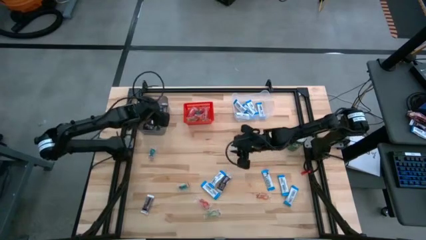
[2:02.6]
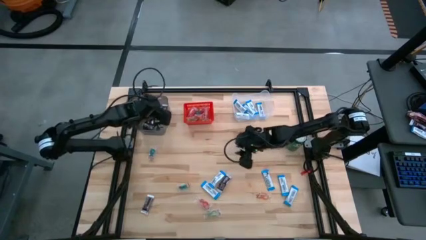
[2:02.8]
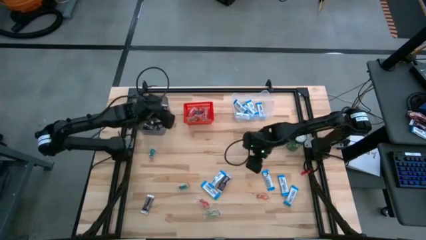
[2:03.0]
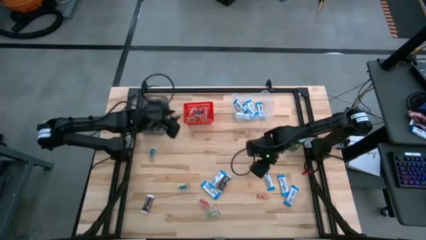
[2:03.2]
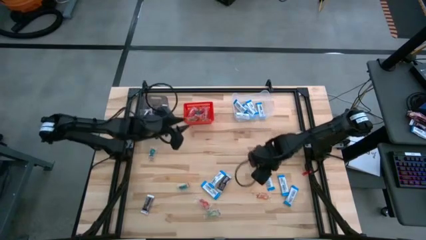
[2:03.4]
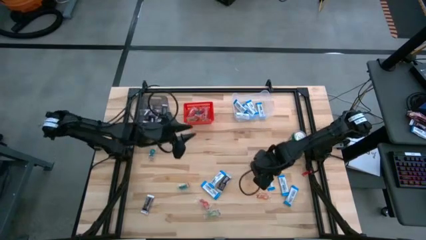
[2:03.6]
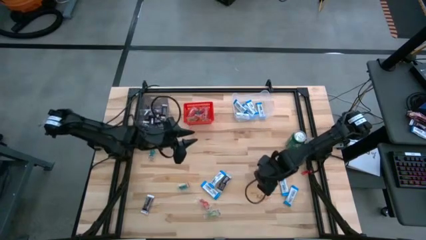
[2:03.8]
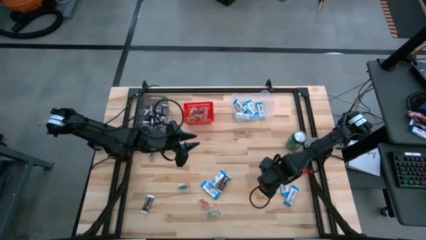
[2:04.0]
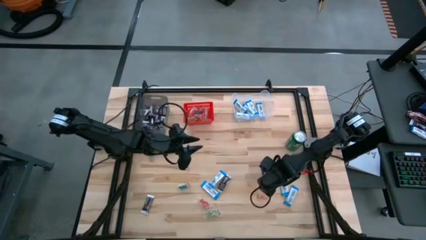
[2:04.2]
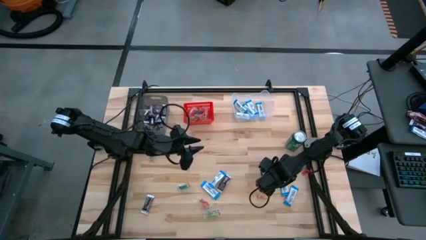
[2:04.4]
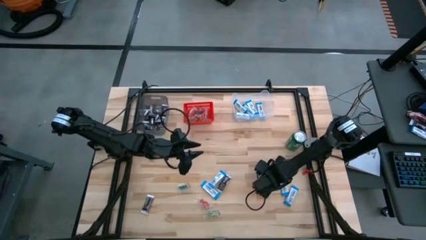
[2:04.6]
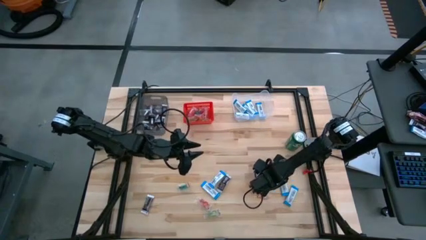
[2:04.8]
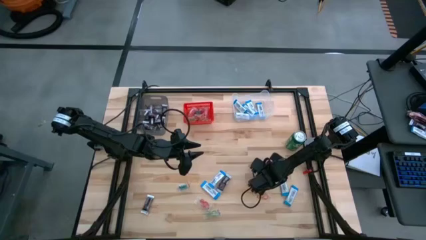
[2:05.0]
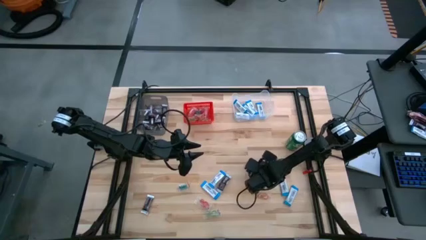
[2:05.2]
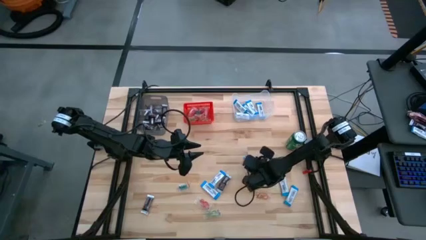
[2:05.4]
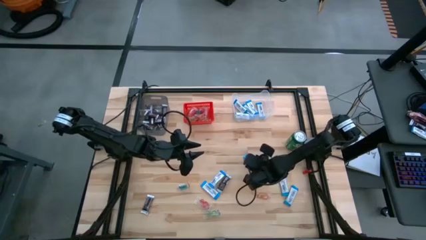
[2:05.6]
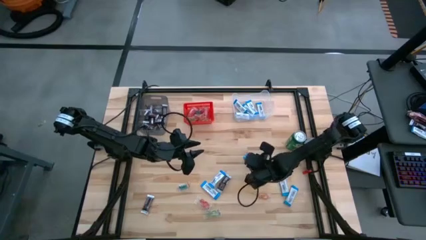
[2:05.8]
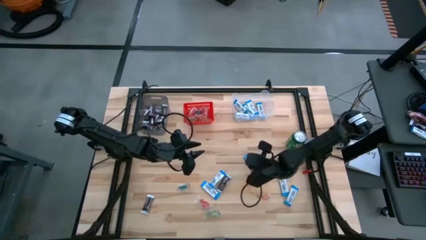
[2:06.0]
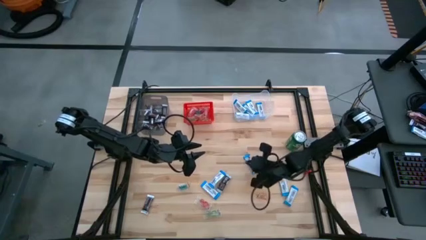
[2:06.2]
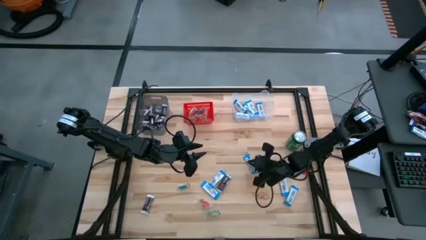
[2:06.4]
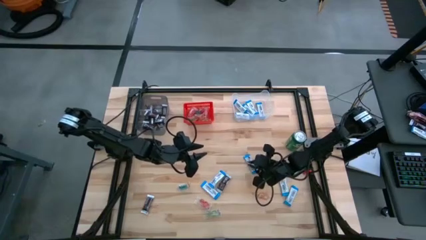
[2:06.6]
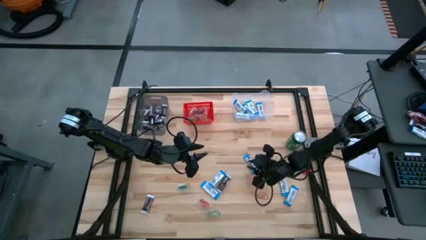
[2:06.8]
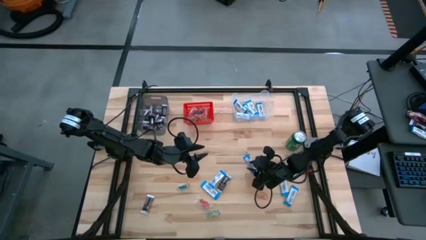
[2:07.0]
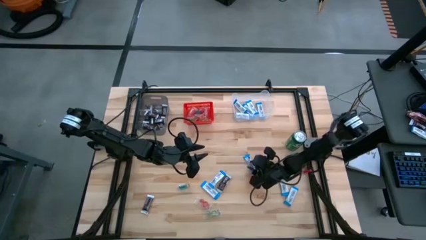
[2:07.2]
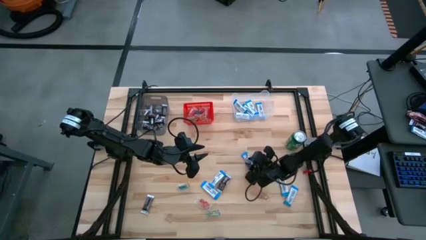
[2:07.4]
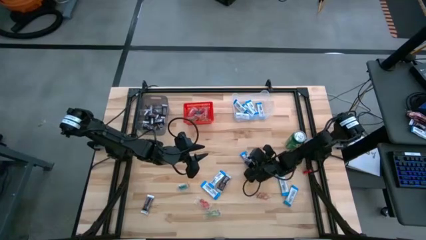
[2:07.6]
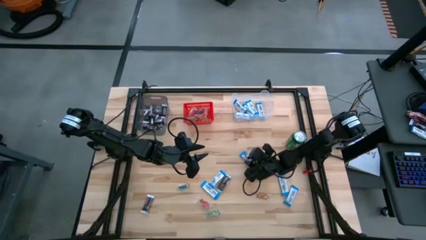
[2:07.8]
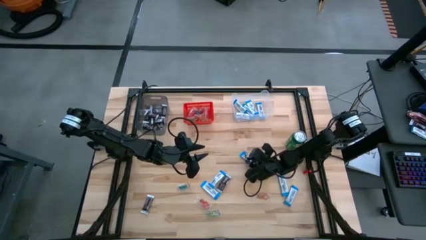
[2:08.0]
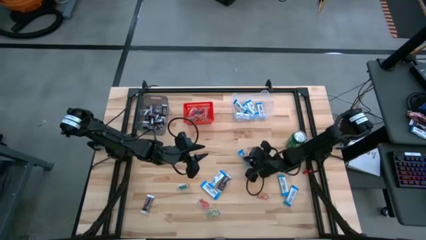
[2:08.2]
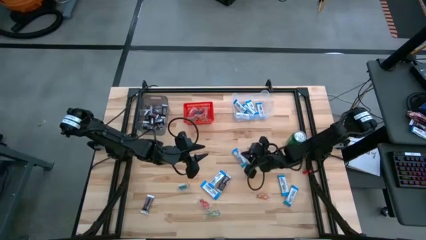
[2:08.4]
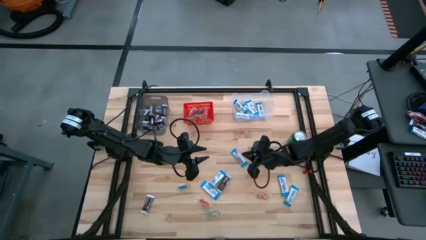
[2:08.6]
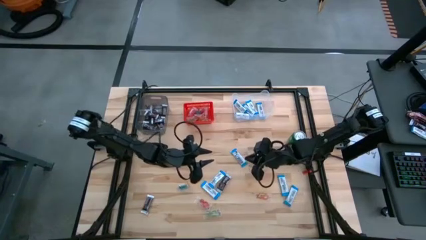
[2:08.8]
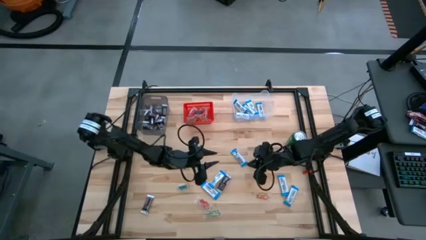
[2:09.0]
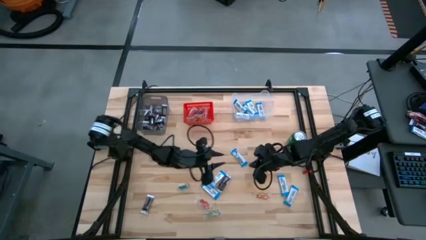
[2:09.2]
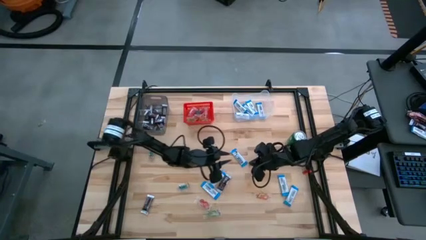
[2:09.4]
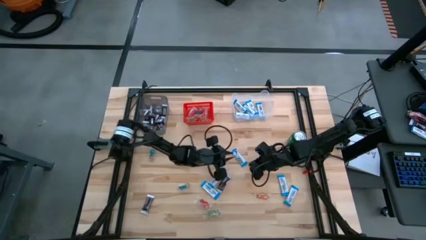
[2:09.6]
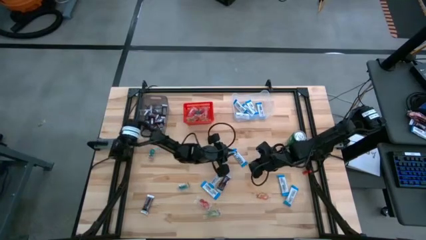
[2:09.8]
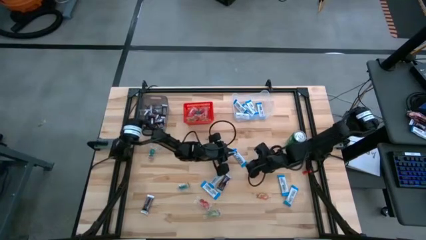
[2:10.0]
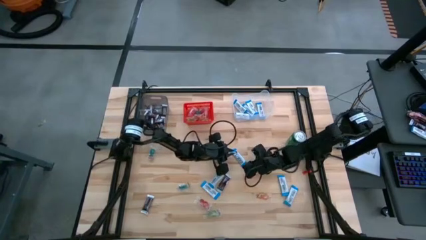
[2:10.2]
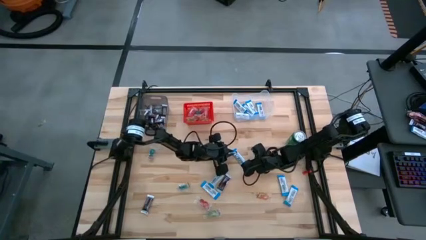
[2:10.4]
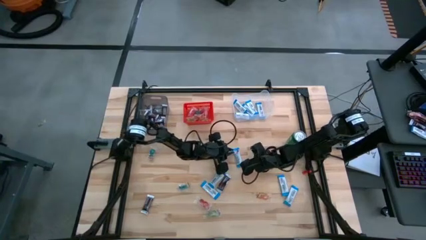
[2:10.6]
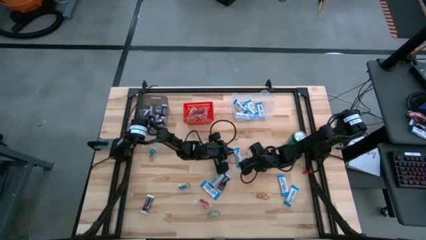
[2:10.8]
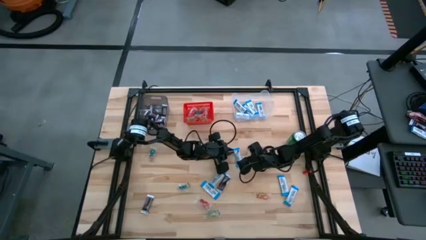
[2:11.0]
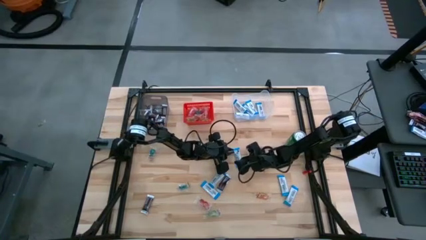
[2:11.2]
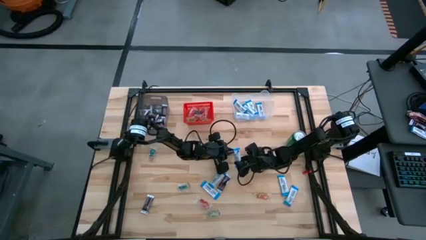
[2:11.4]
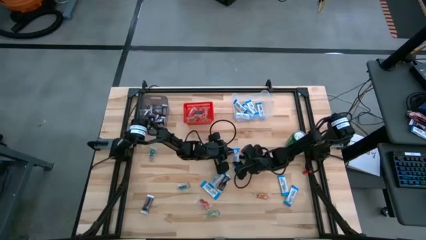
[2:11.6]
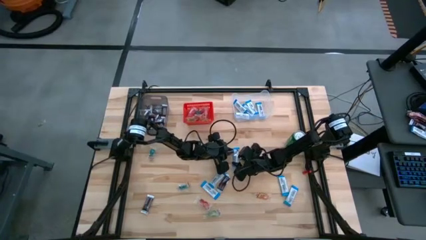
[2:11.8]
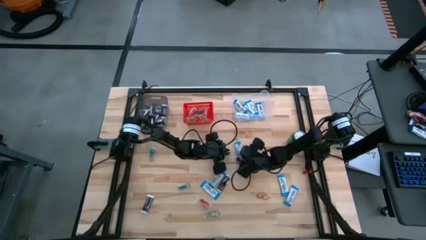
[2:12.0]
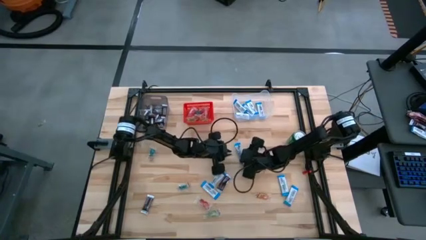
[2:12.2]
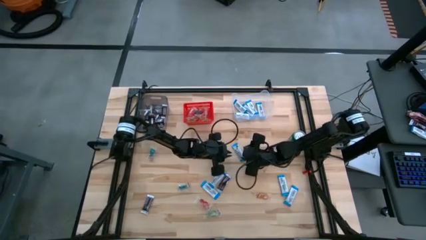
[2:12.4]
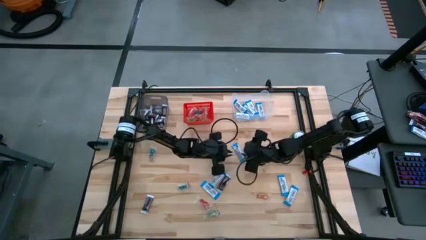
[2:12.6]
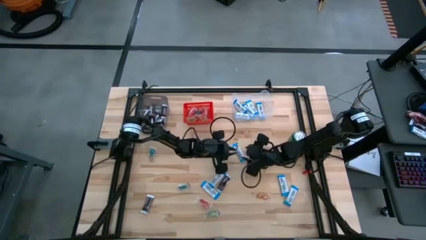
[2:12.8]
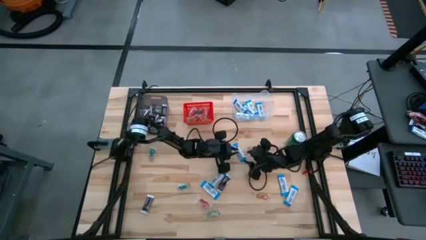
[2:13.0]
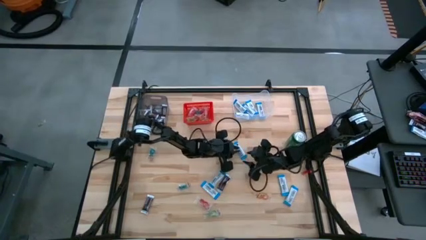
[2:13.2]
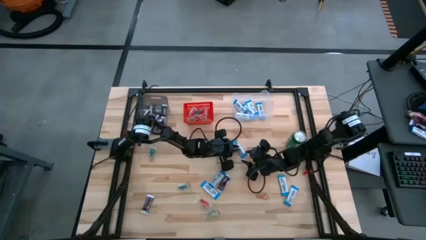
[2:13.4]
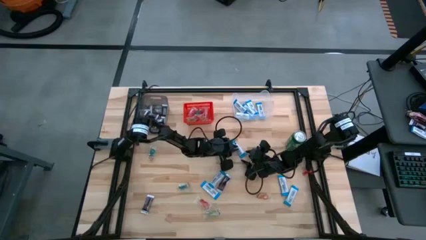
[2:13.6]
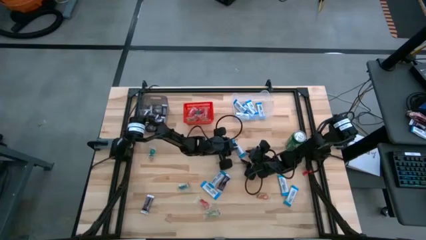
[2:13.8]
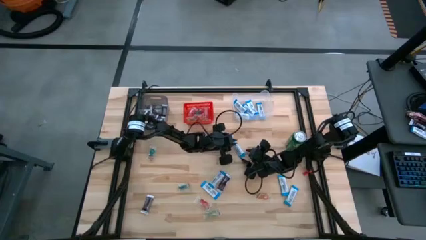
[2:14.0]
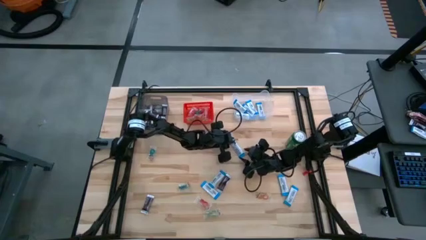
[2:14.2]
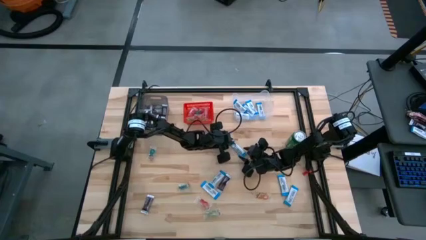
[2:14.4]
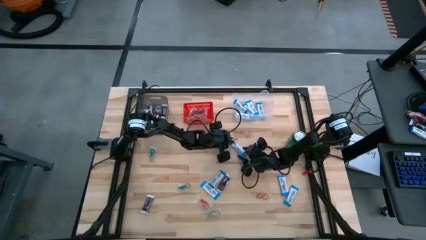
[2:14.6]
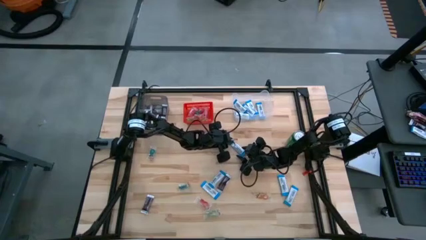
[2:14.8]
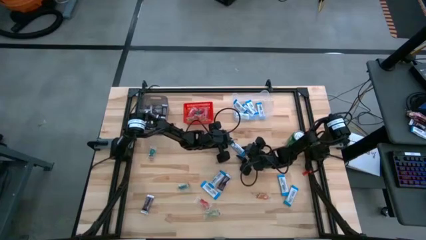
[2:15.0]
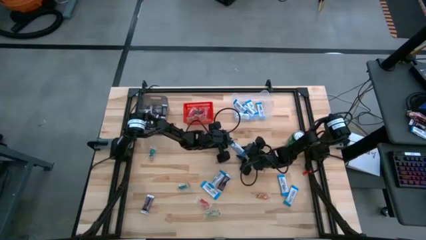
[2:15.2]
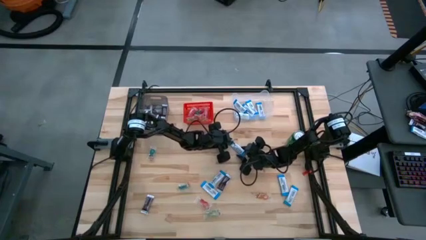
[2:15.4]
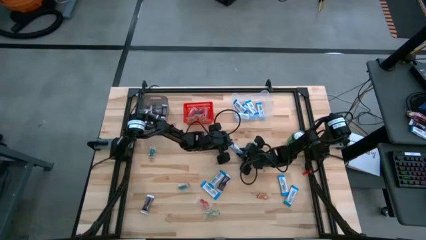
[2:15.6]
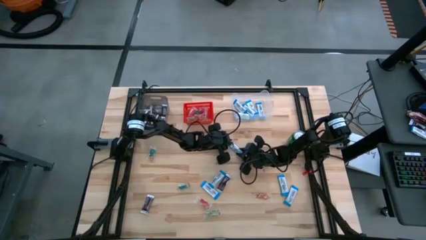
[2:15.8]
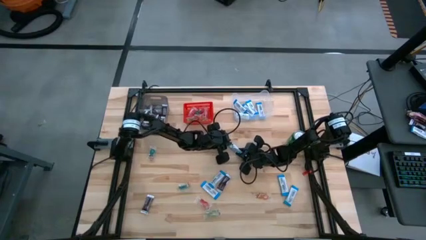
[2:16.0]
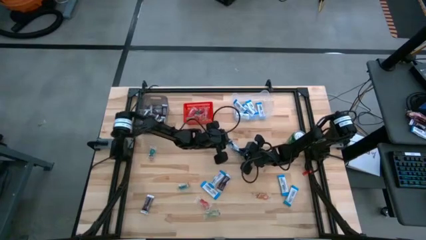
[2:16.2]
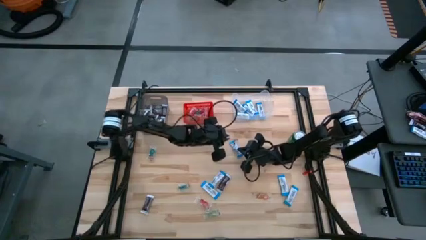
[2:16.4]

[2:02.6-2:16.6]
Task: Sort candy
Put the white chocolate into the transparent bin

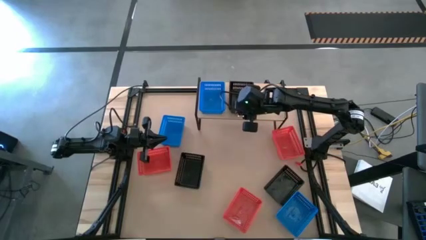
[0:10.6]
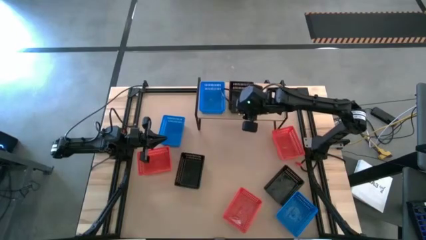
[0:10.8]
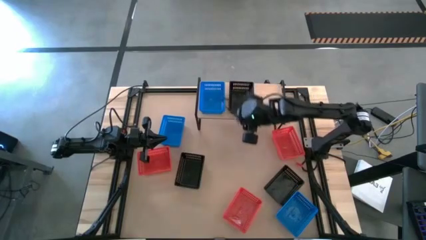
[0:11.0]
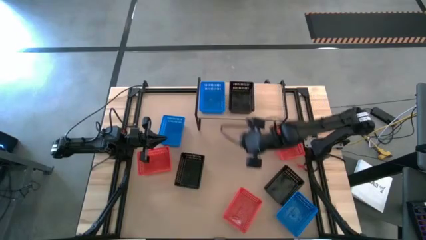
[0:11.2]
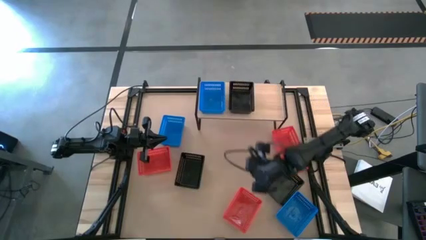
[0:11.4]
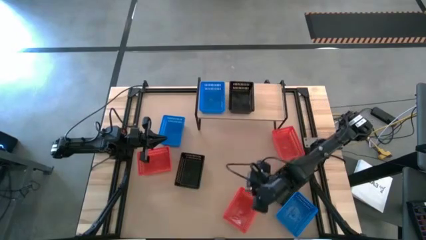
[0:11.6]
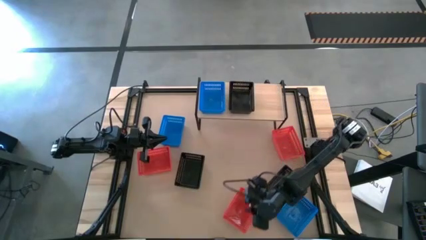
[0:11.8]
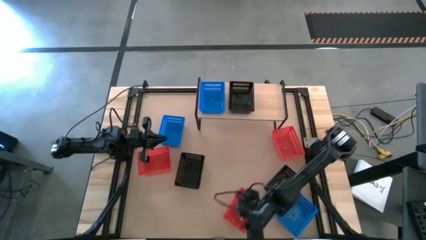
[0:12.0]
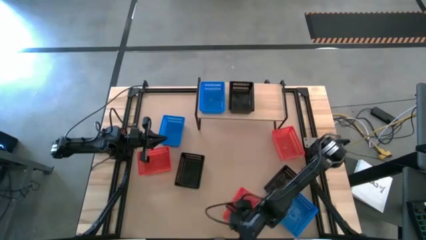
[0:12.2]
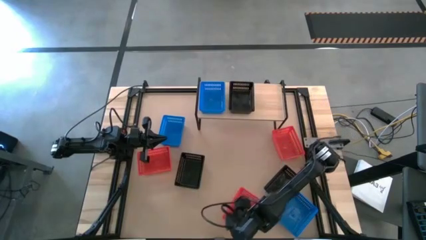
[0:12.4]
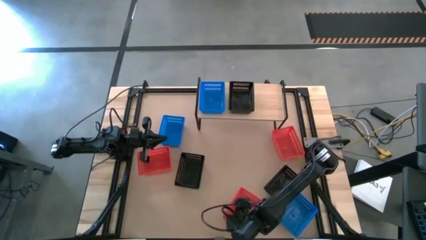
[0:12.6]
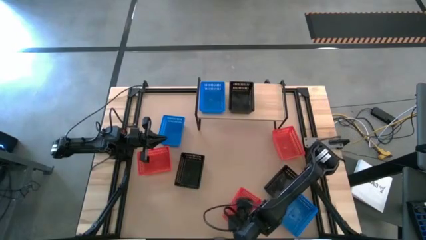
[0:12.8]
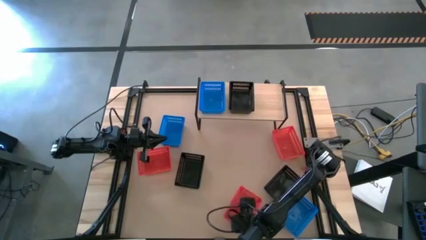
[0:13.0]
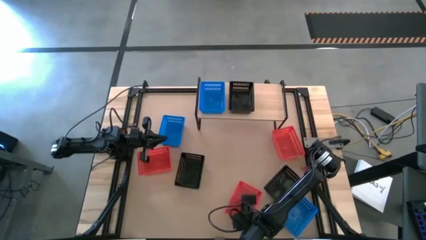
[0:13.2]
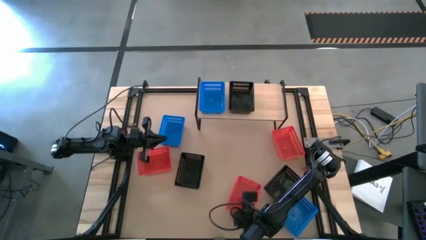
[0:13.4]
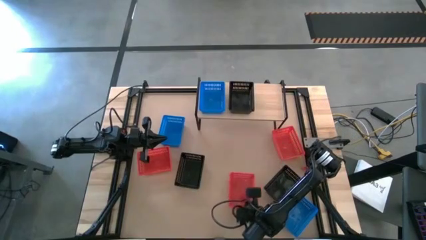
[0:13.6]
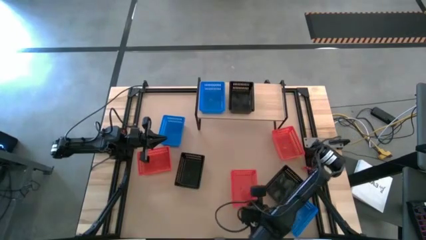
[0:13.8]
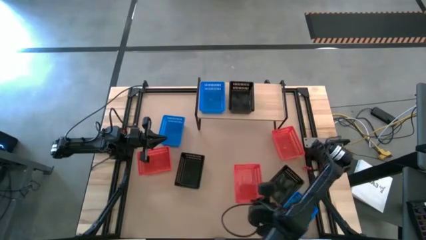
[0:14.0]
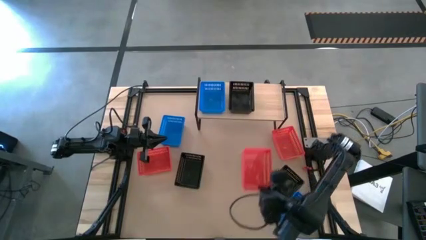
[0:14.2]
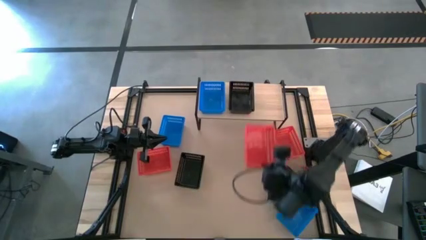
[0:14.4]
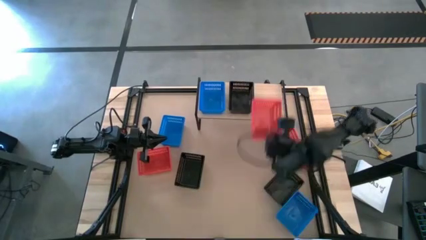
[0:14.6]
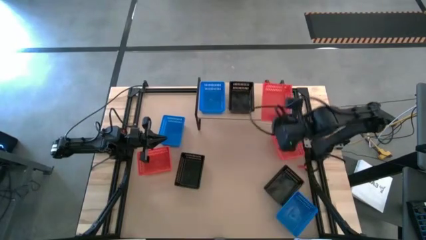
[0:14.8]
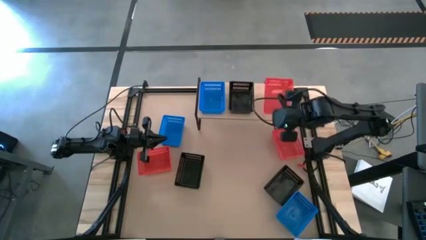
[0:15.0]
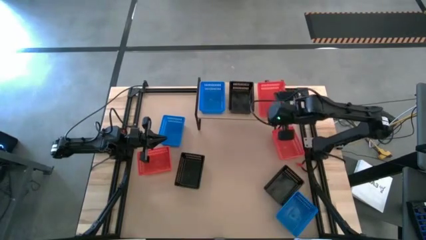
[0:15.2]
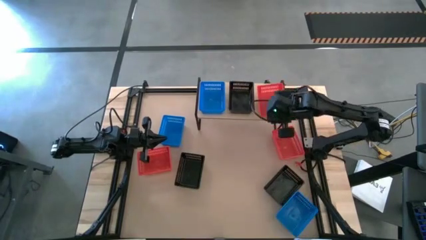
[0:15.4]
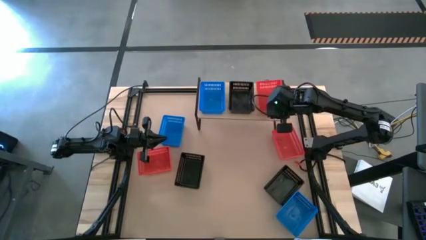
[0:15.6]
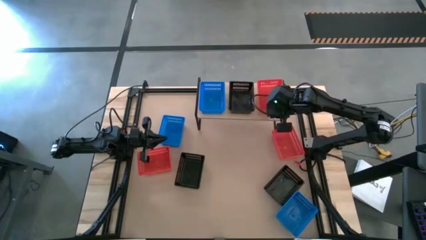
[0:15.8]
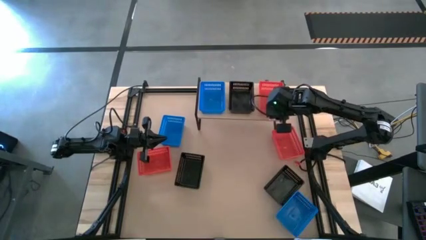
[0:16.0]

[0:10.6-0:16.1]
Task: Stack baskets on shelf by color
Put the bottom red basket on the shelf
